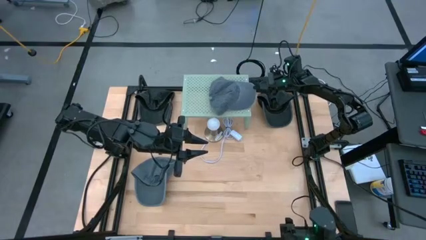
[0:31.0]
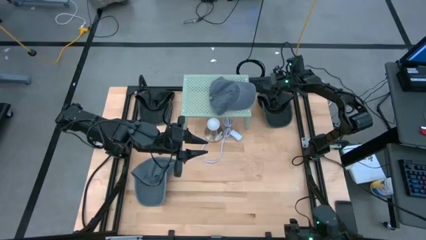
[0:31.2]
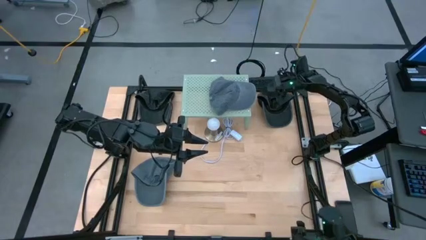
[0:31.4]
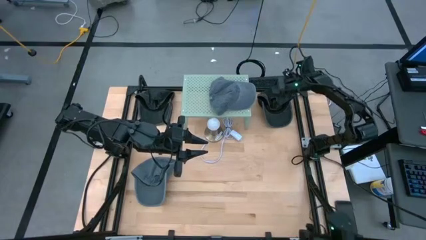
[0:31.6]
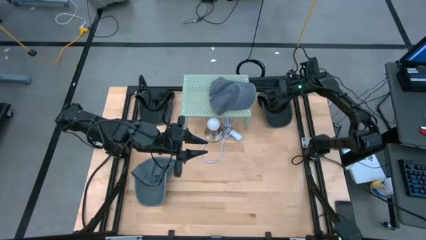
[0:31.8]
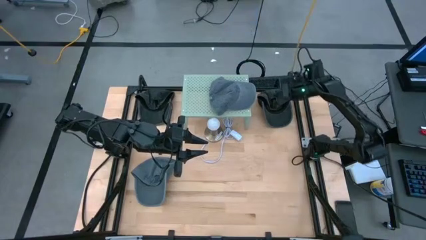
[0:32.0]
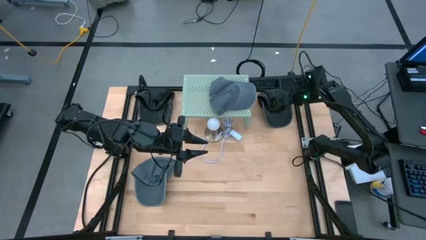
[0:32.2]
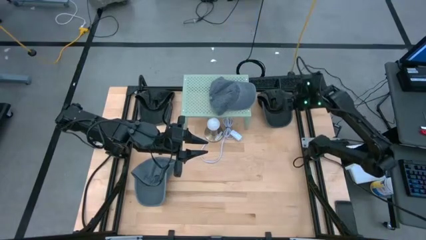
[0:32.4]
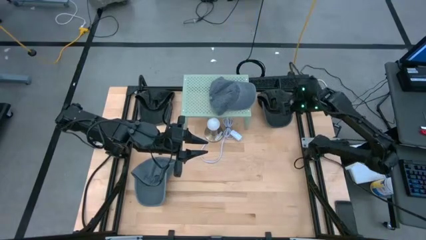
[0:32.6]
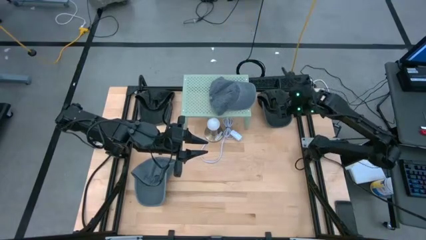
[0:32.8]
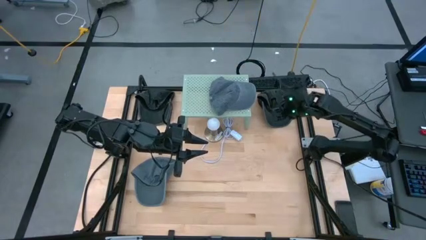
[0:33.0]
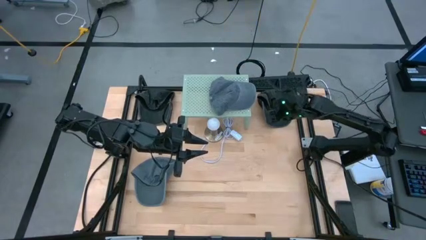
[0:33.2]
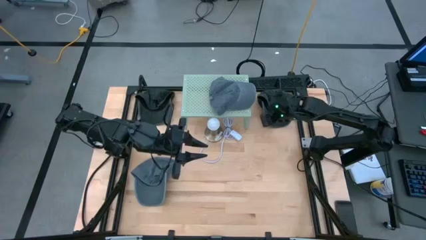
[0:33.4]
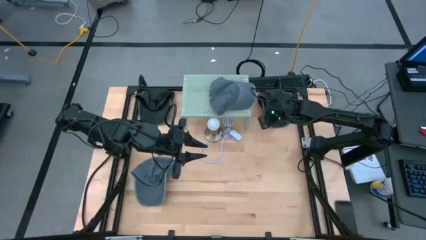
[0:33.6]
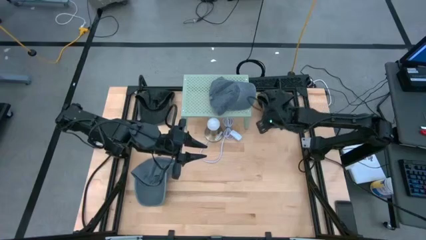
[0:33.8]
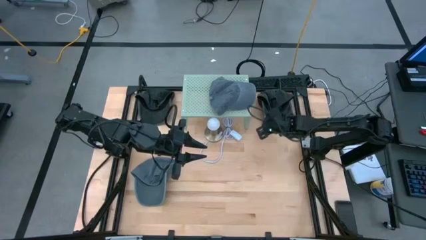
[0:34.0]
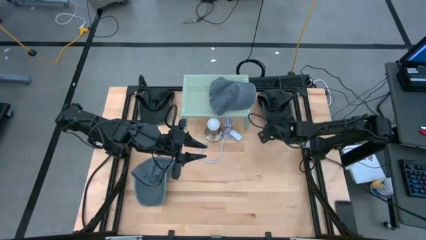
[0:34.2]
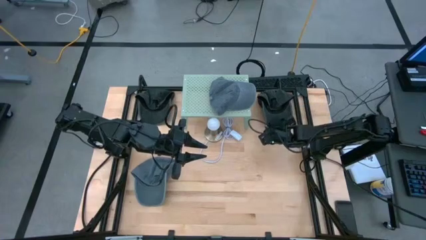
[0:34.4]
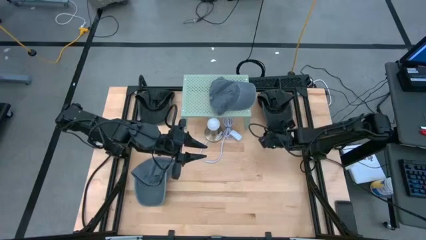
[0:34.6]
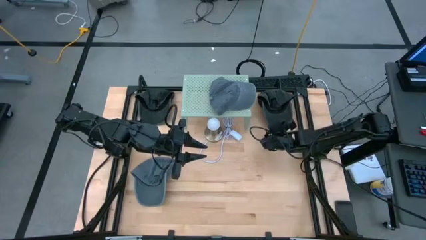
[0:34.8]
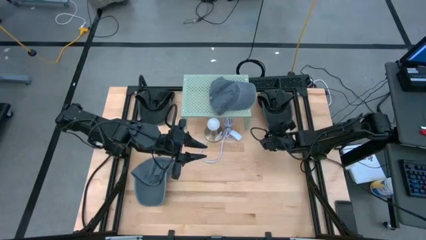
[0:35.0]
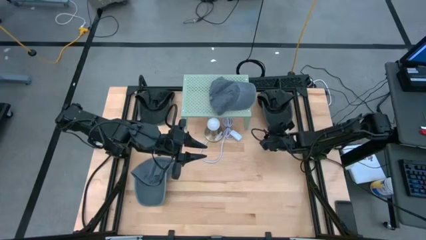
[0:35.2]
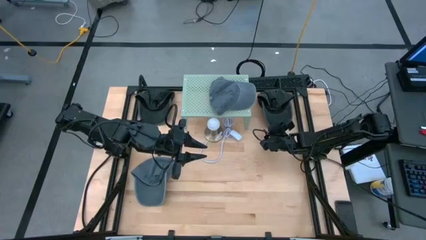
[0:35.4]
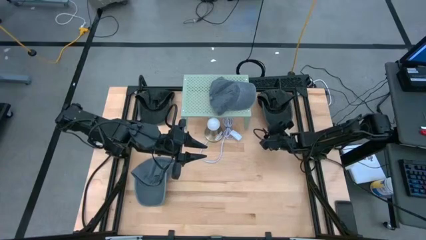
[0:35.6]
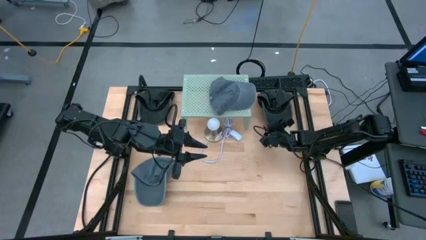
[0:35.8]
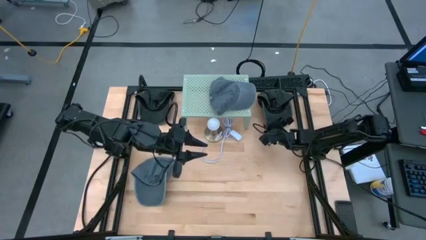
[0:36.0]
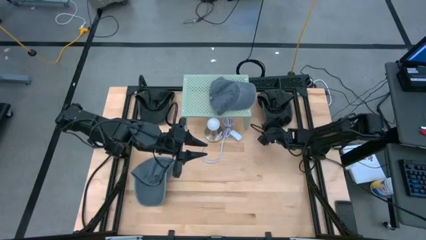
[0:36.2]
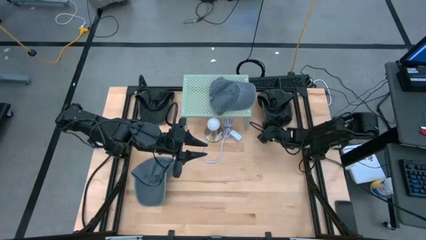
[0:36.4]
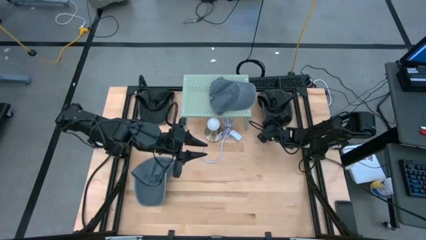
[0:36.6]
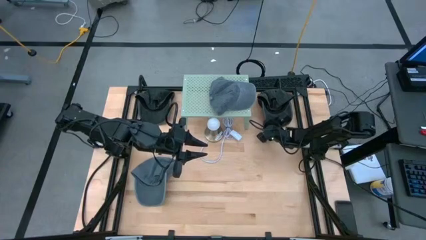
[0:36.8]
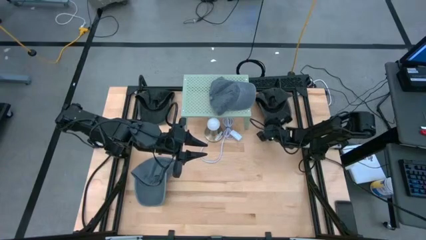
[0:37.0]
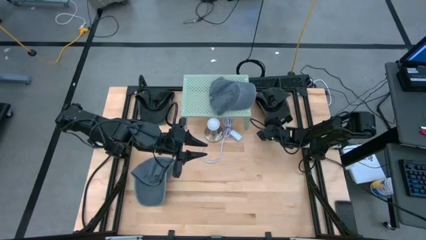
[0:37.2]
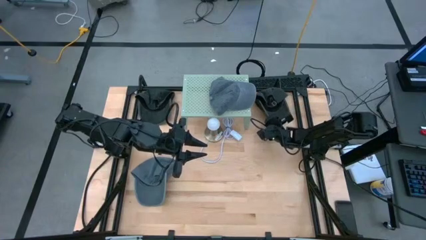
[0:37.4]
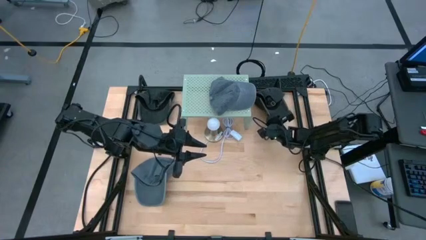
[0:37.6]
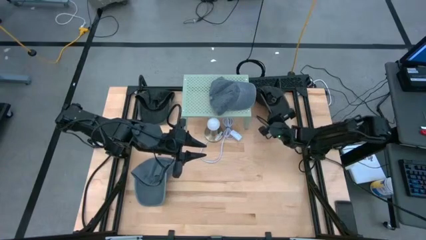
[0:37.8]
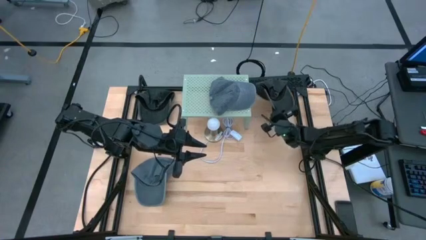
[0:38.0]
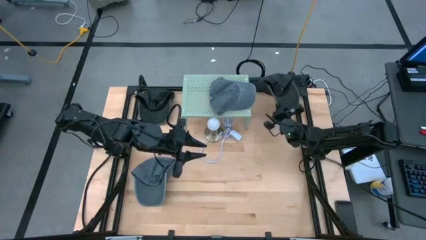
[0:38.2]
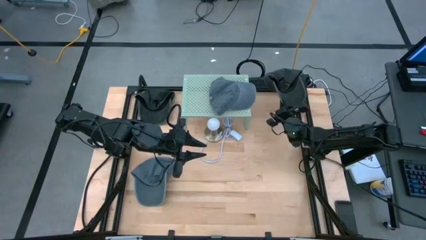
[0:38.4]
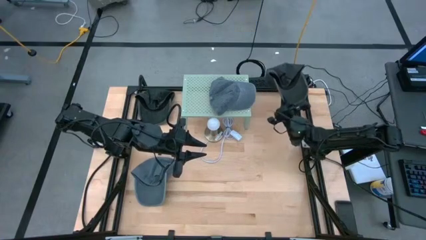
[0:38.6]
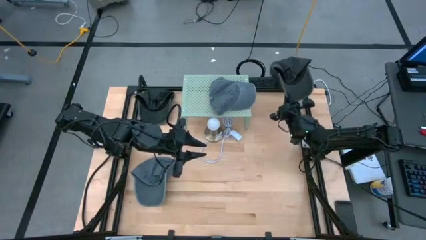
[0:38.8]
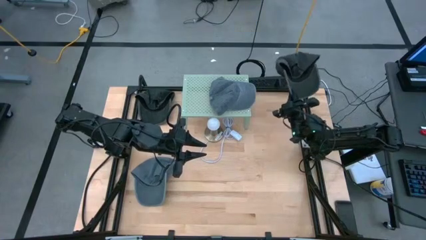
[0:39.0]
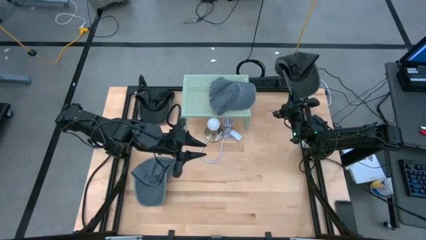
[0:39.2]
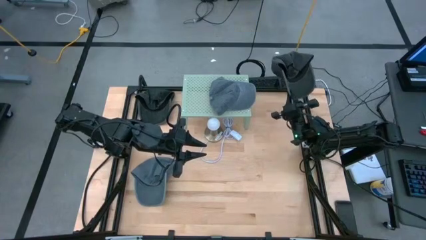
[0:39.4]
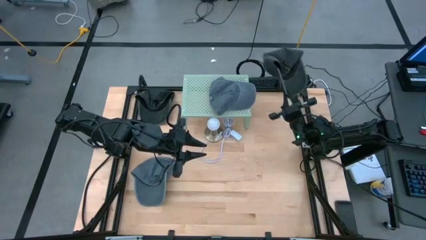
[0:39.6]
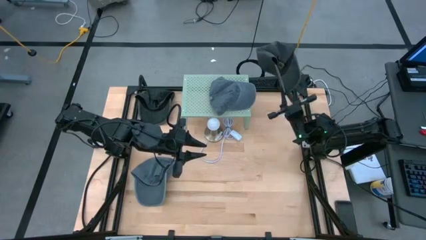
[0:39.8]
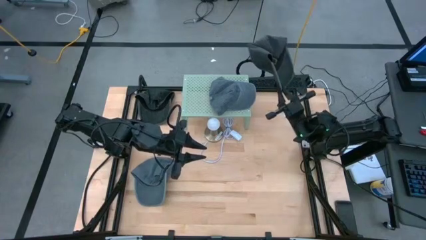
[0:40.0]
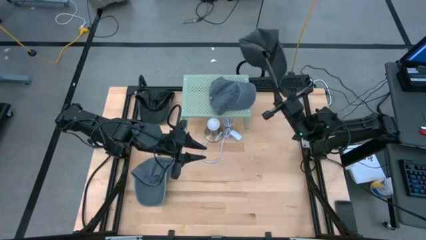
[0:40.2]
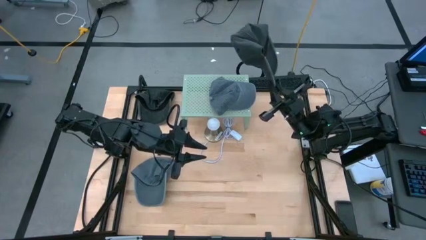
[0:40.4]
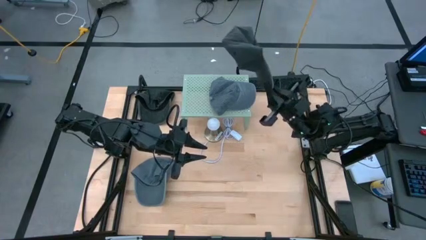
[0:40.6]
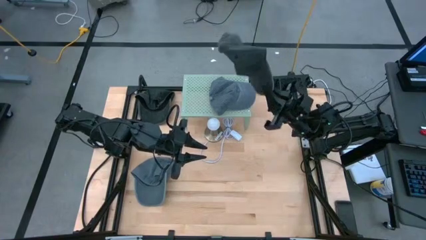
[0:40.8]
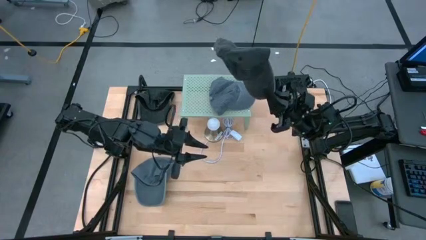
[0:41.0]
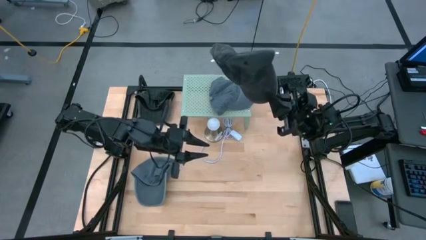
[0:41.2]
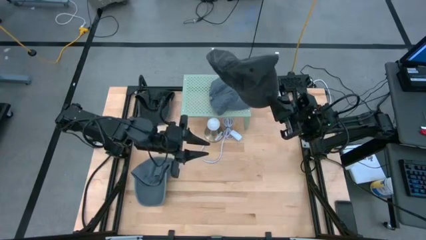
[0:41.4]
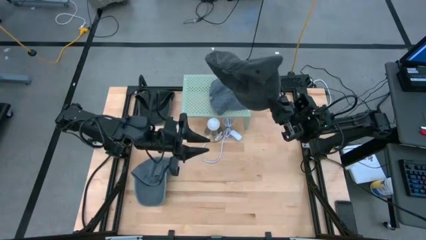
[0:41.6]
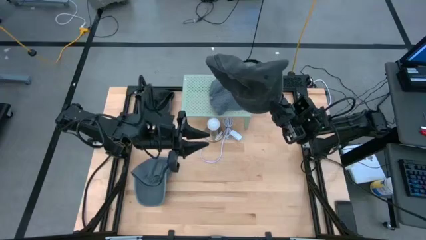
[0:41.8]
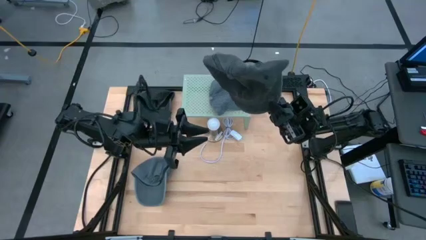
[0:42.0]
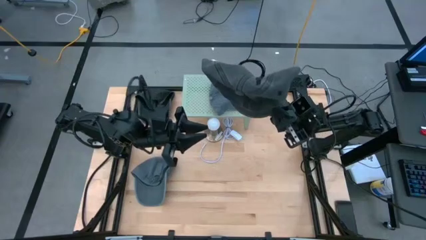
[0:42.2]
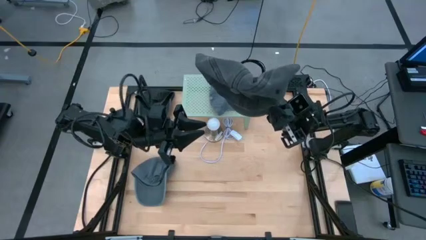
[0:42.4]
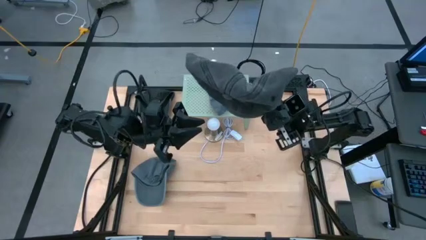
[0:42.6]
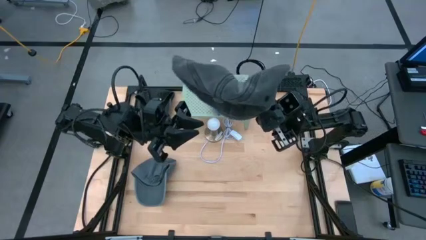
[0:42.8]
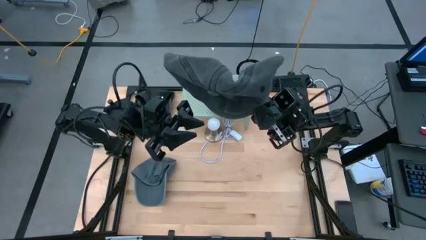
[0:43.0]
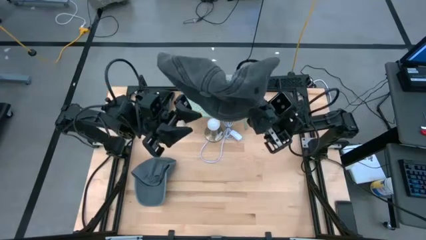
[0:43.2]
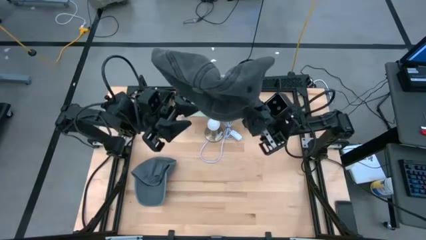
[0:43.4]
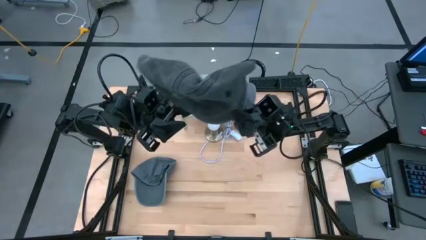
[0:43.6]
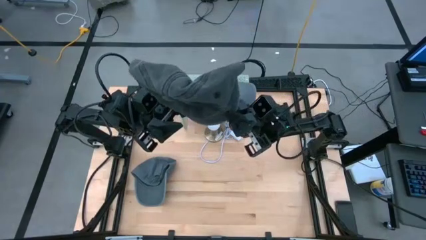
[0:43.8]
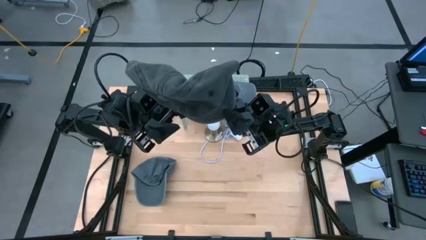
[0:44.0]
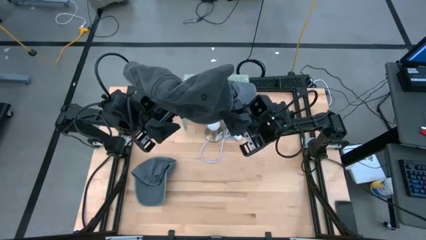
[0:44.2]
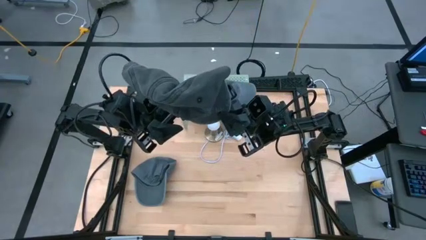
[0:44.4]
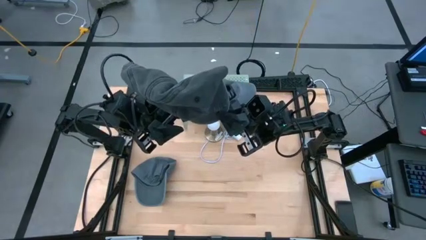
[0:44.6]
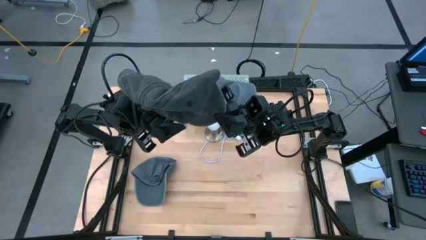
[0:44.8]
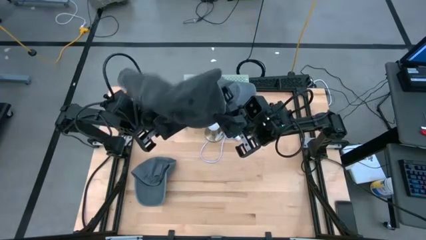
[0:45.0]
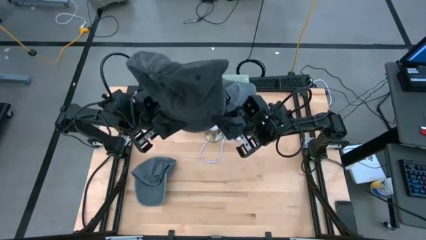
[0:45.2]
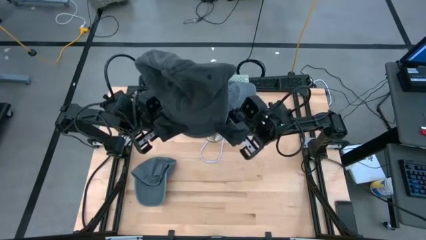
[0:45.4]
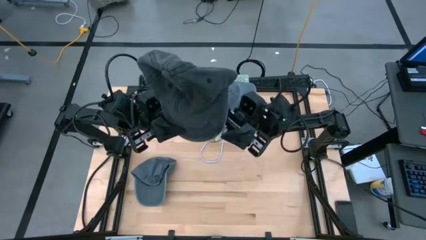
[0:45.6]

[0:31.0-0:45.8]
Task: Pick & Place hat
Put the right black cap on the shelf
